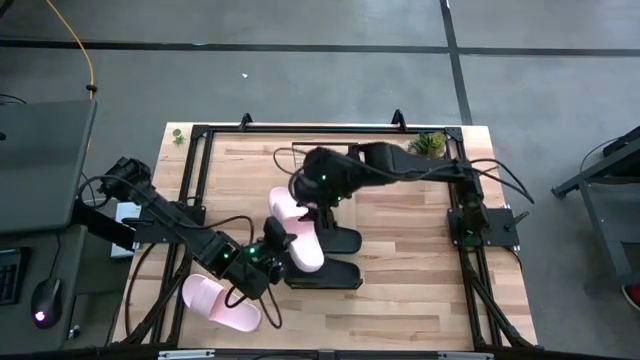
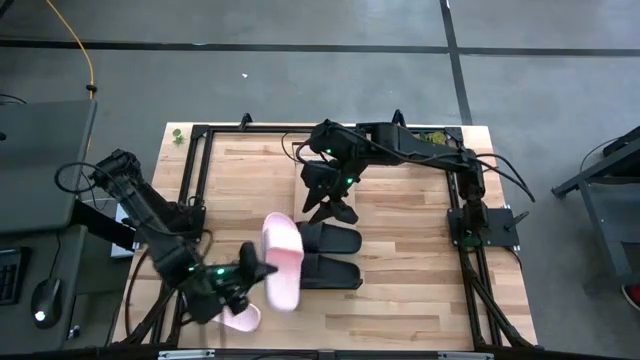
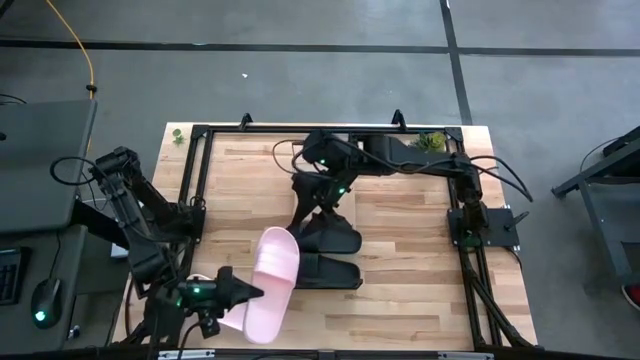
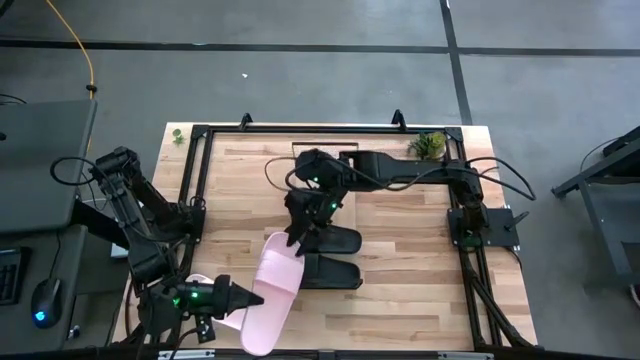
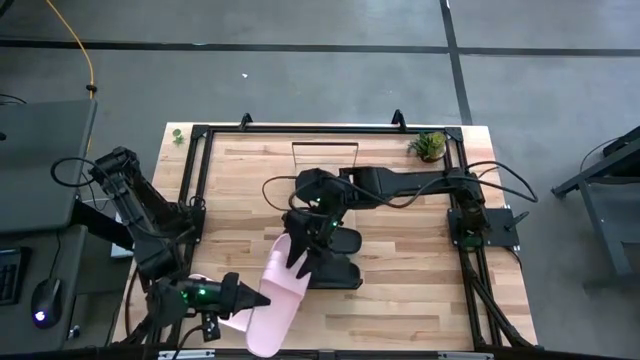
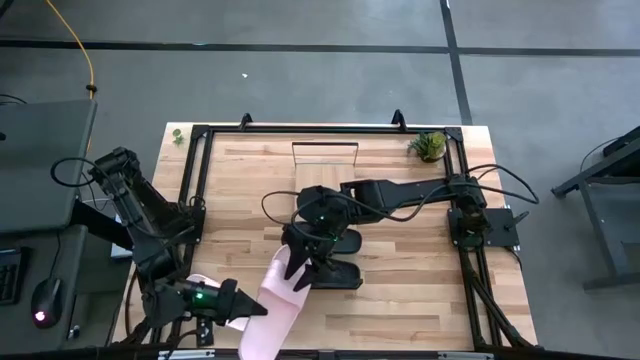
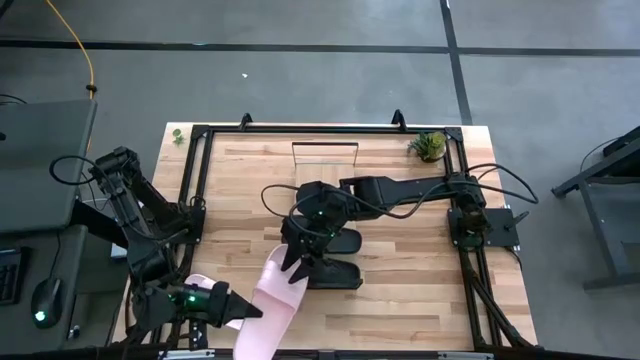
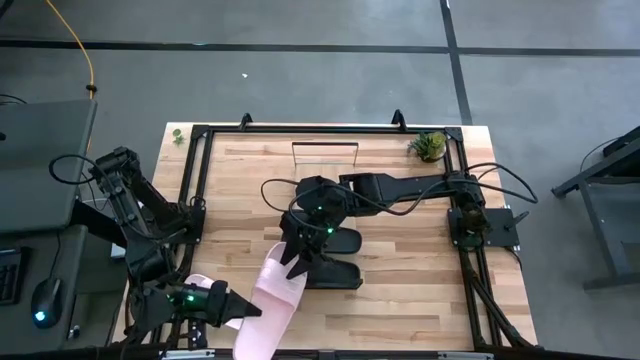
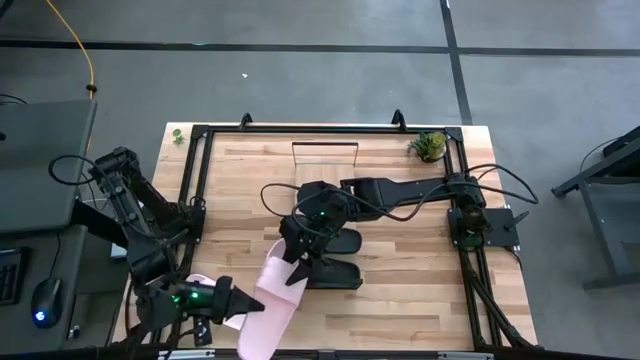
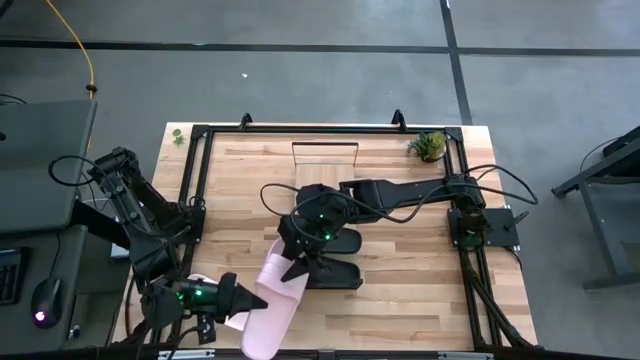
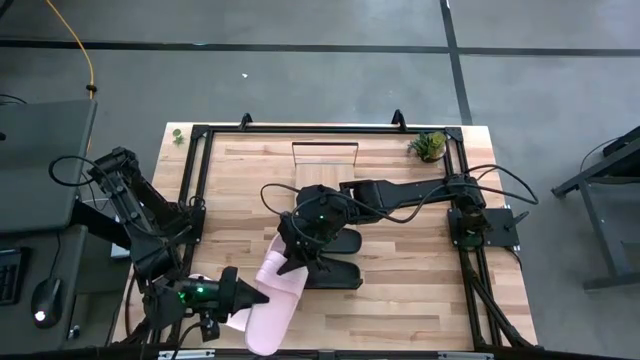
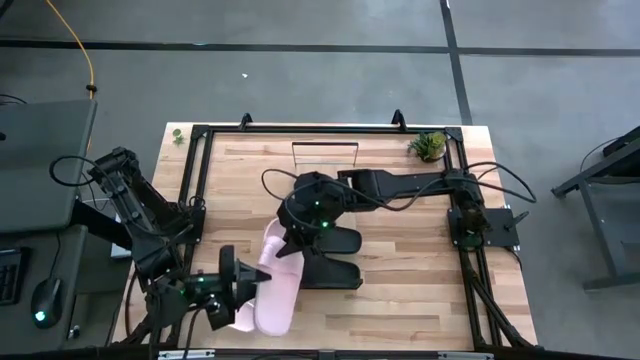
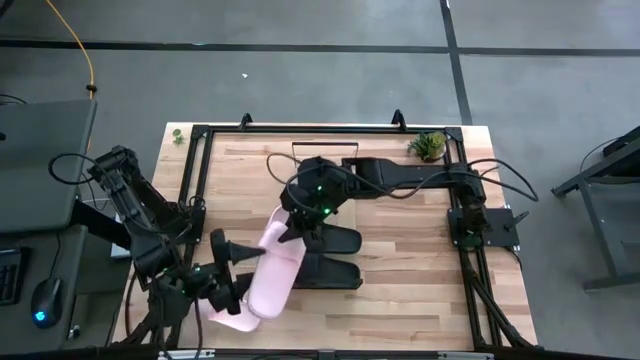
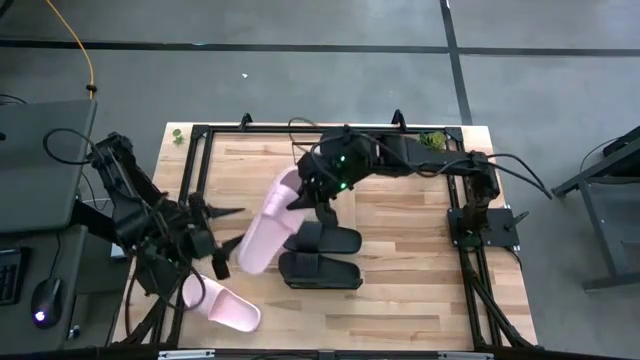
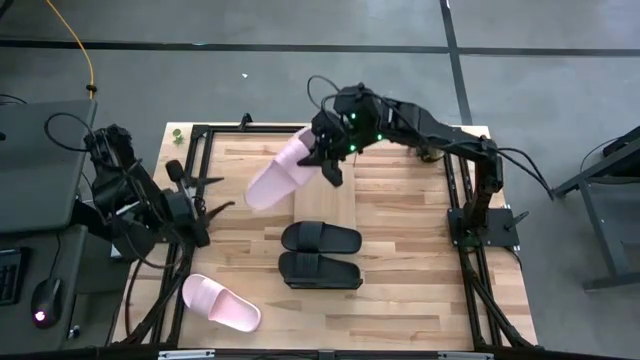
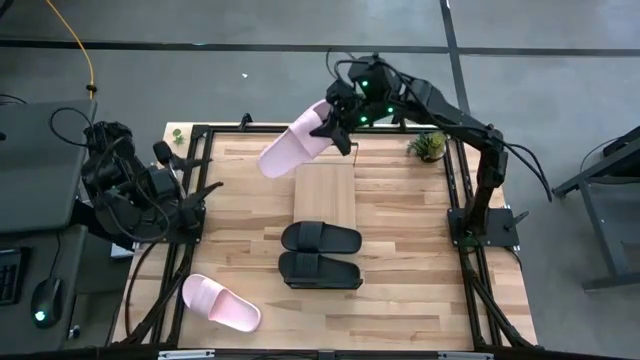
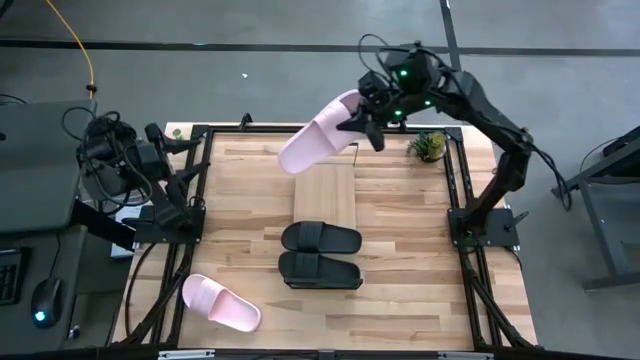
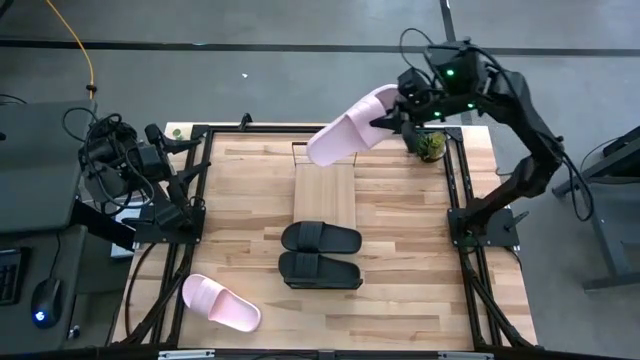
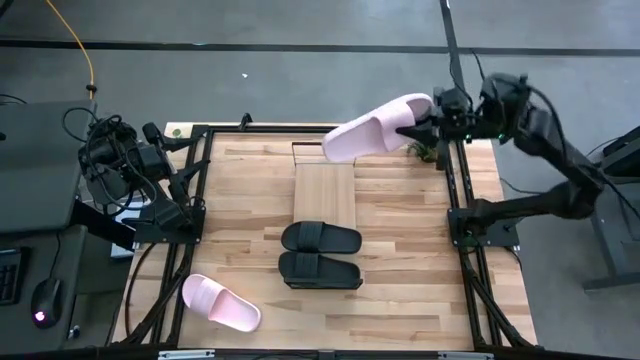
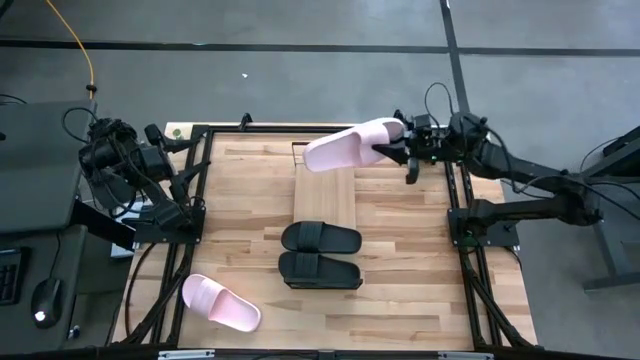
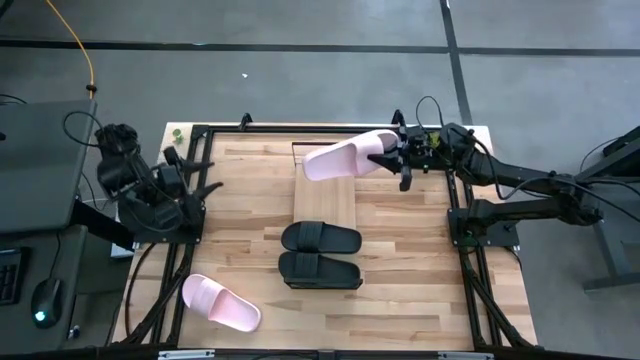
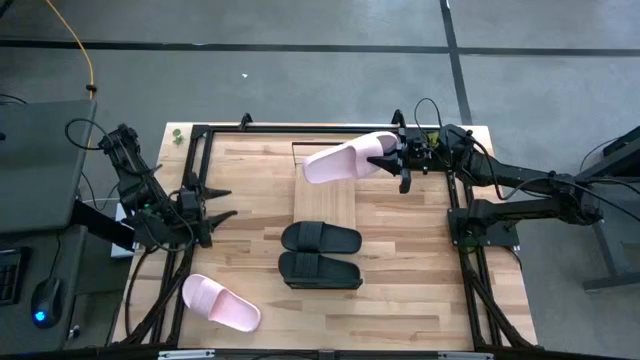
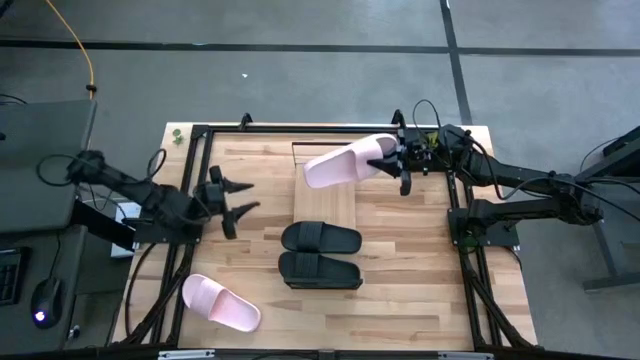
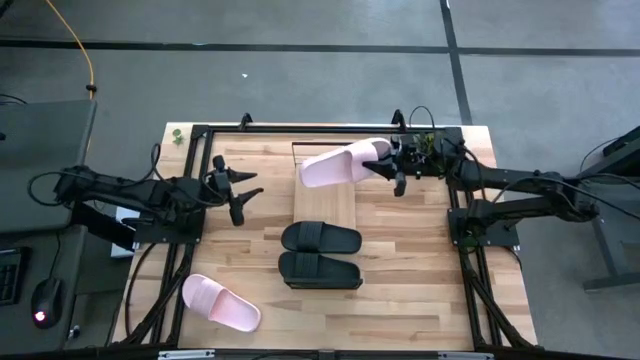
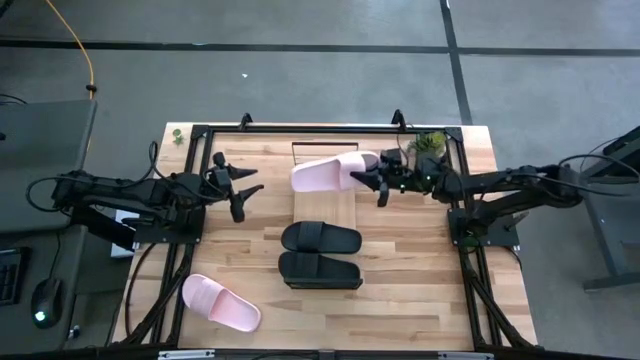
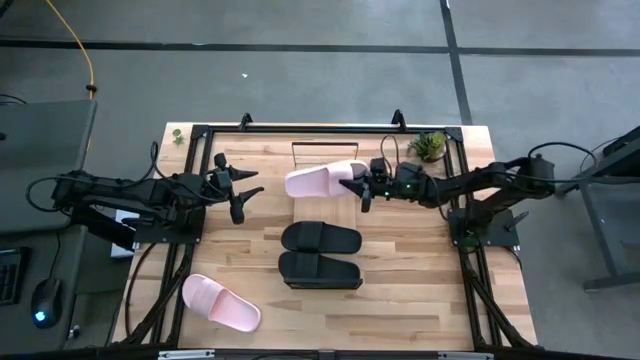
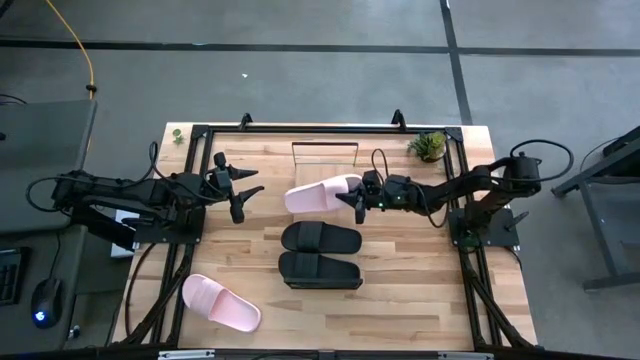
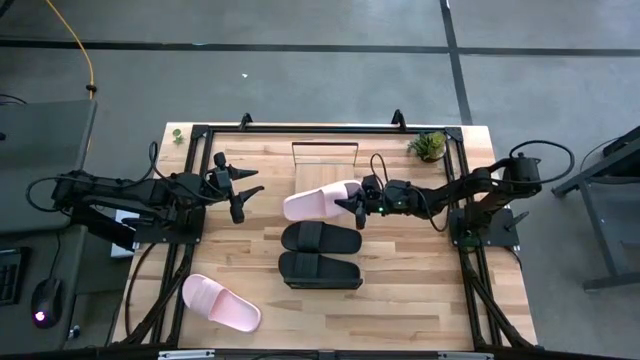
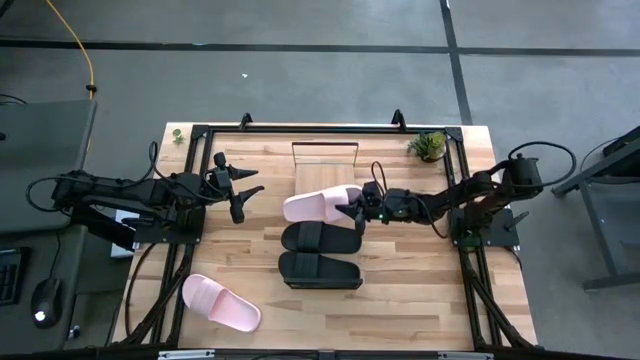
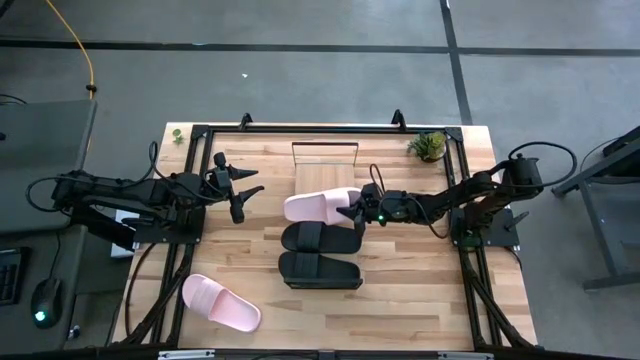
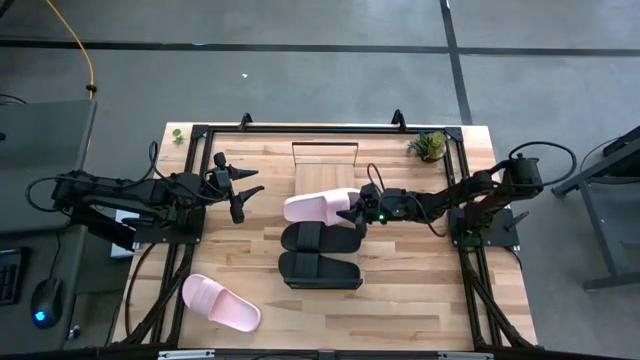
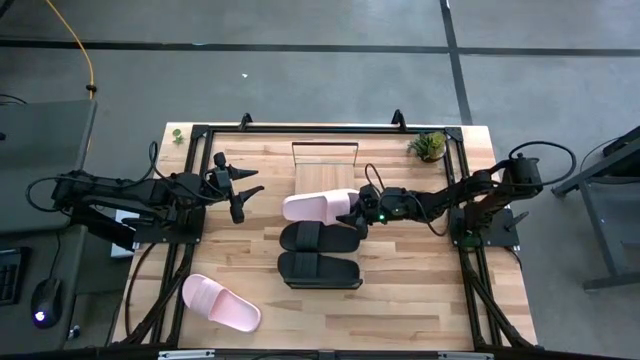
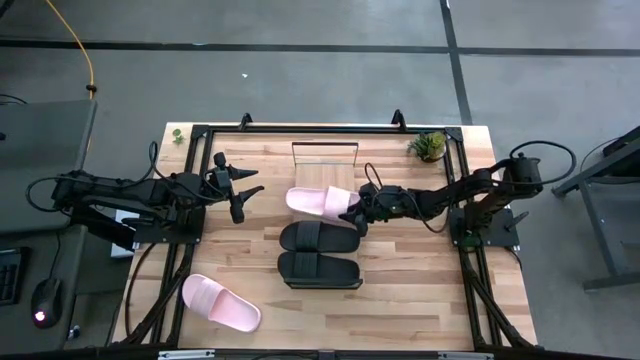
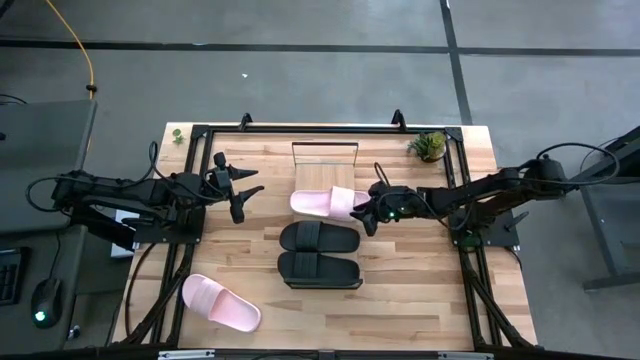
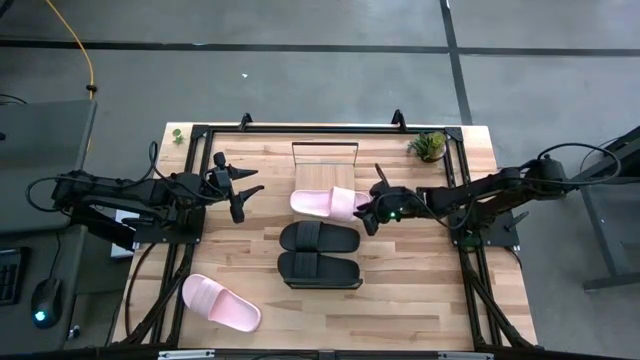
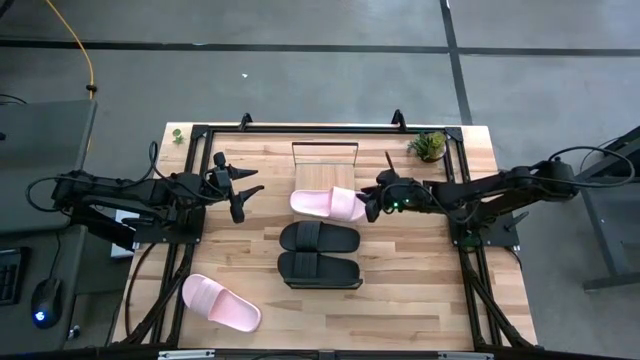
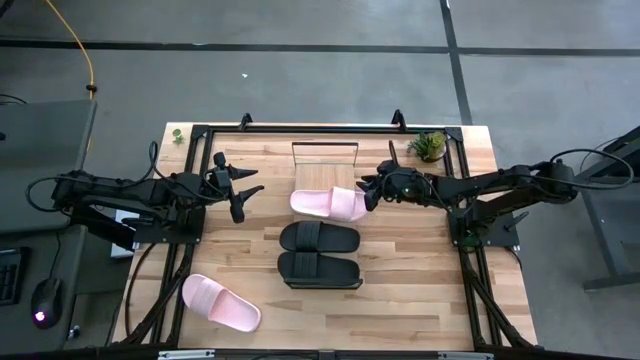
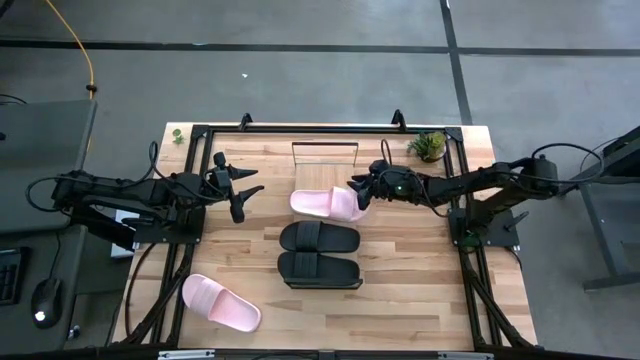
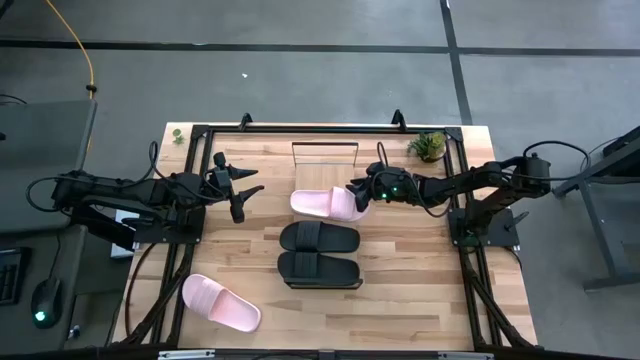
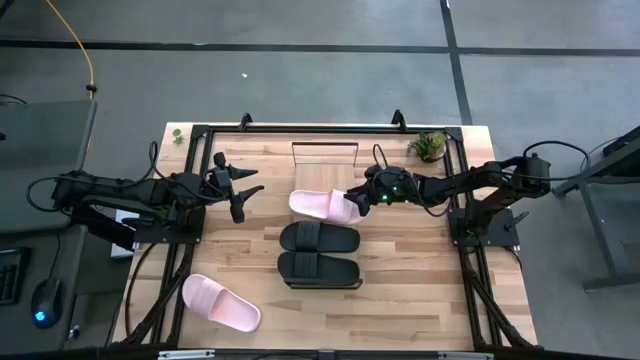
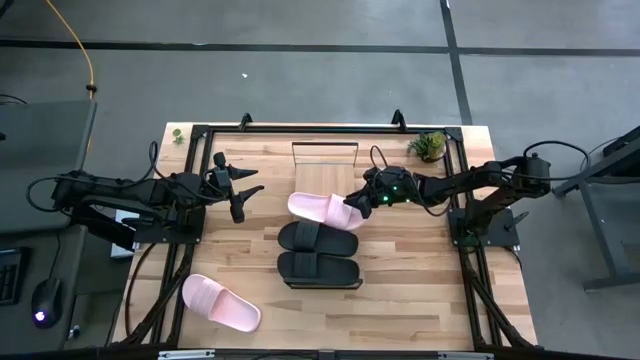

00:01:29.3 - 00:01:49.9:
Task: Pick and place slides into the shelf
Put the top pink slipper on the shelf
